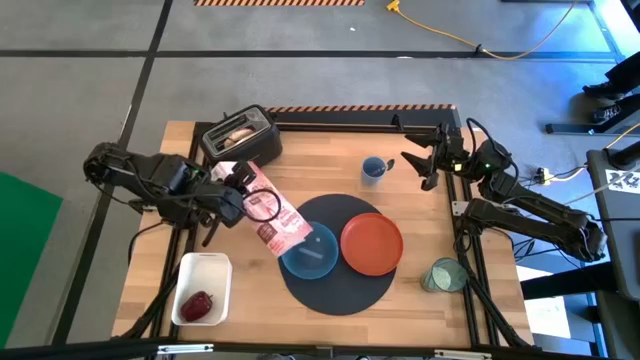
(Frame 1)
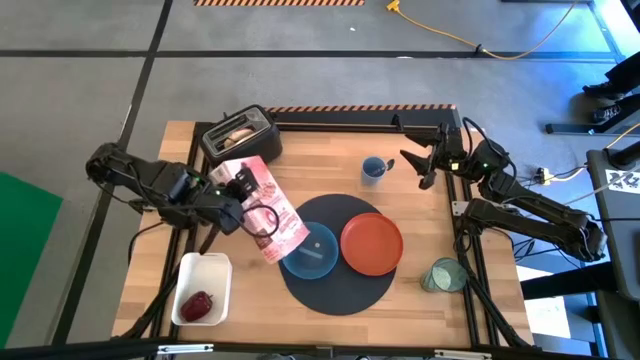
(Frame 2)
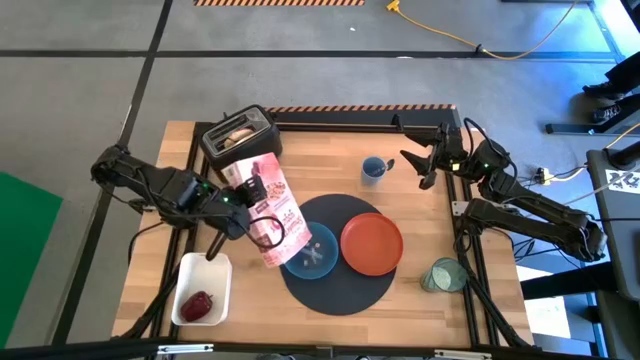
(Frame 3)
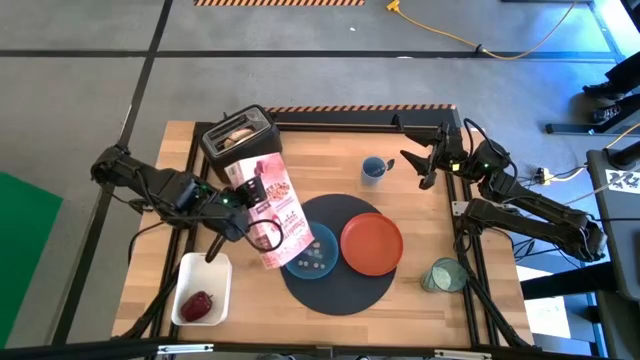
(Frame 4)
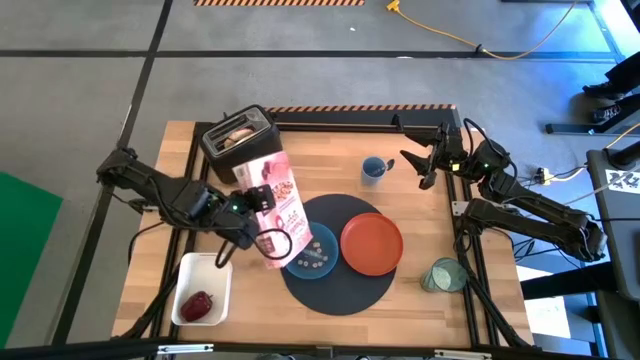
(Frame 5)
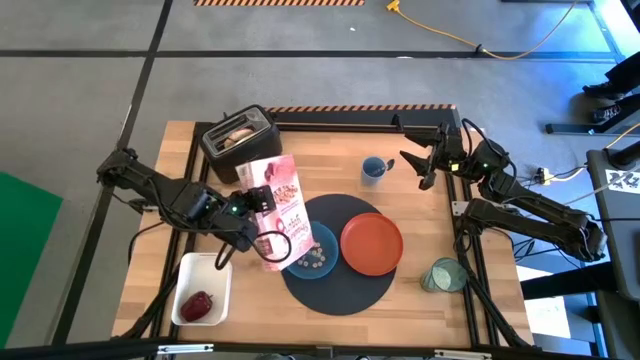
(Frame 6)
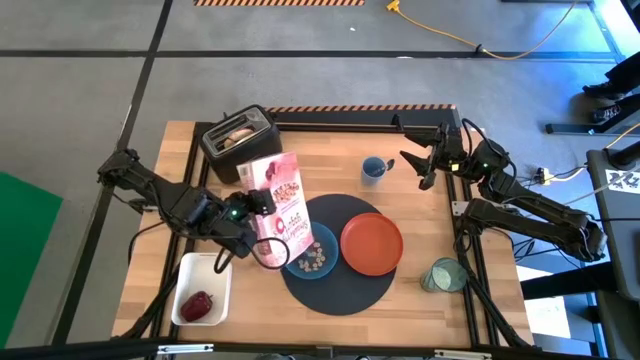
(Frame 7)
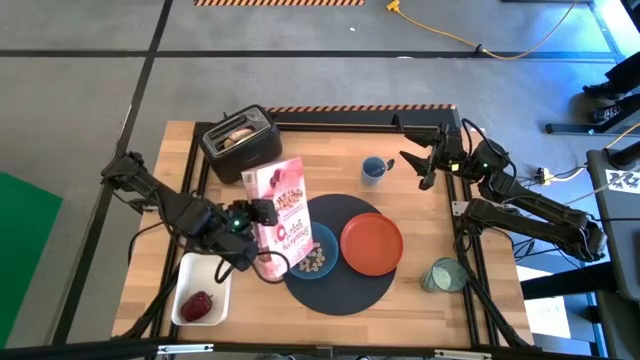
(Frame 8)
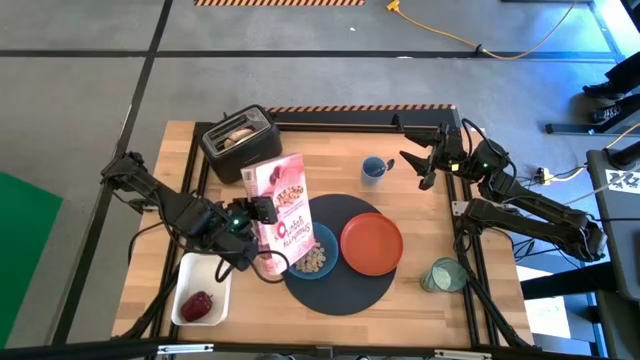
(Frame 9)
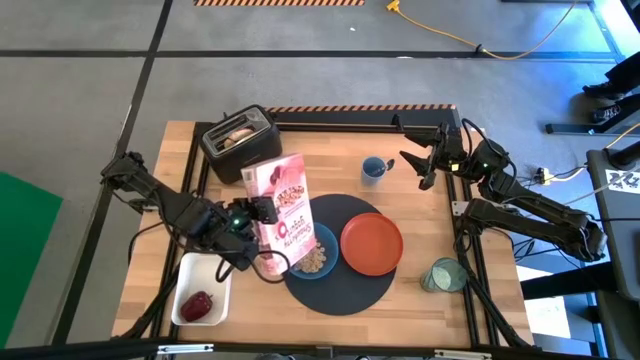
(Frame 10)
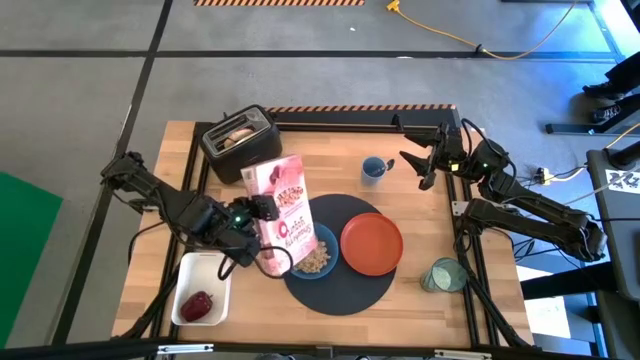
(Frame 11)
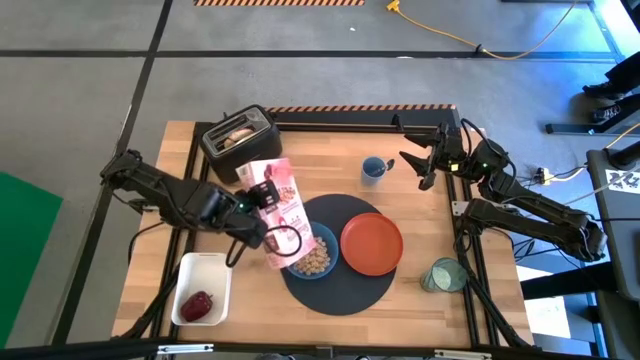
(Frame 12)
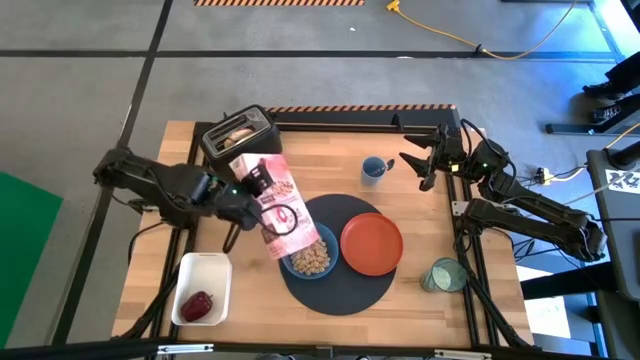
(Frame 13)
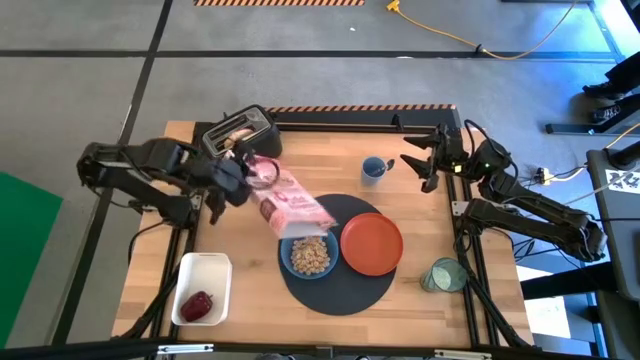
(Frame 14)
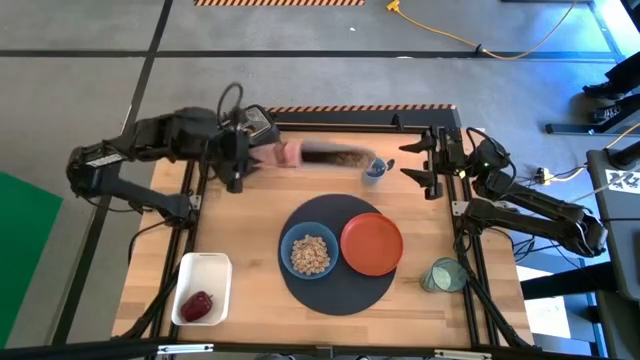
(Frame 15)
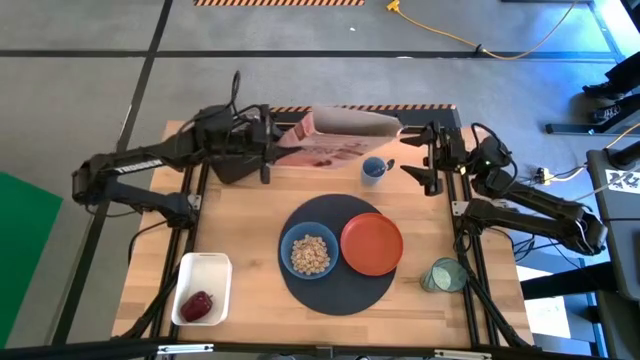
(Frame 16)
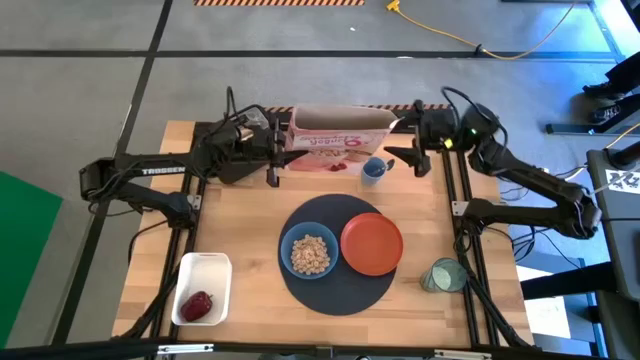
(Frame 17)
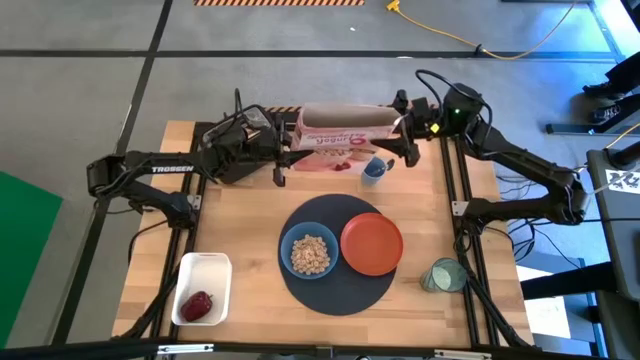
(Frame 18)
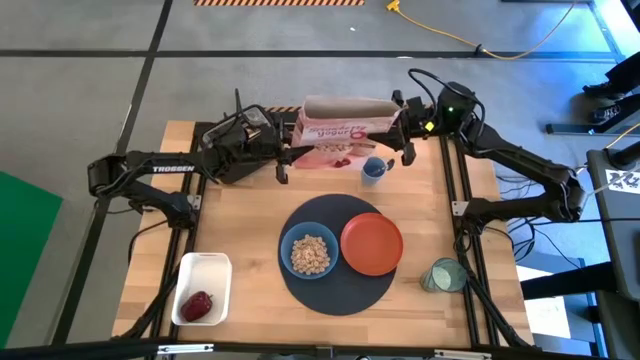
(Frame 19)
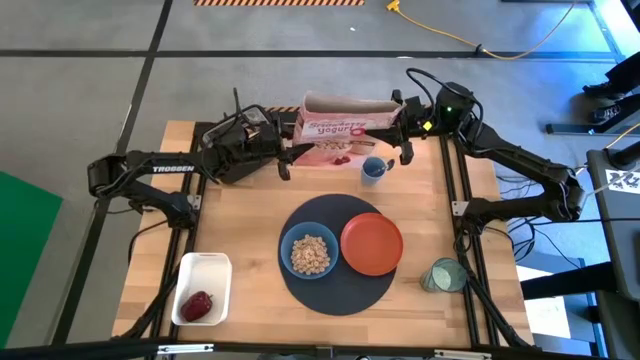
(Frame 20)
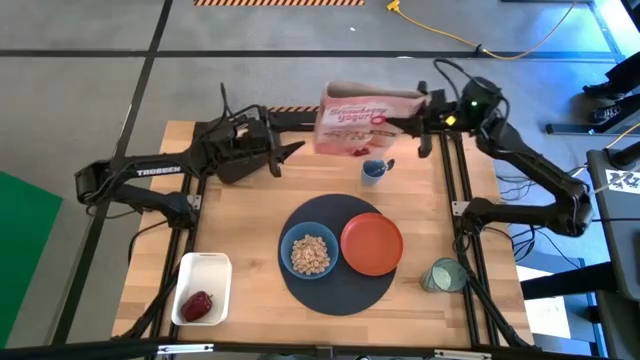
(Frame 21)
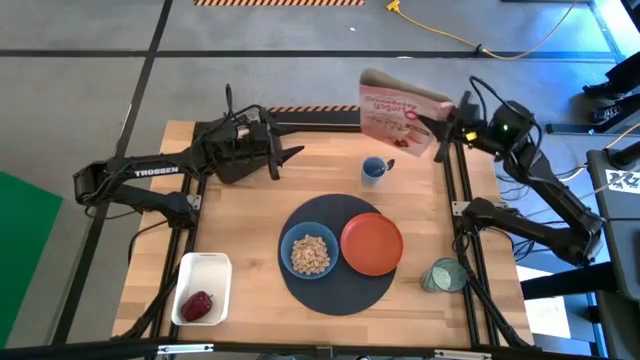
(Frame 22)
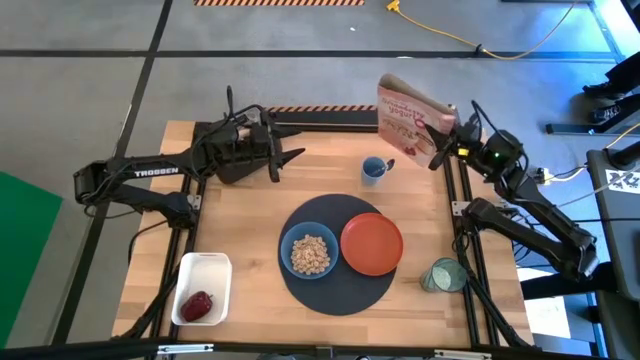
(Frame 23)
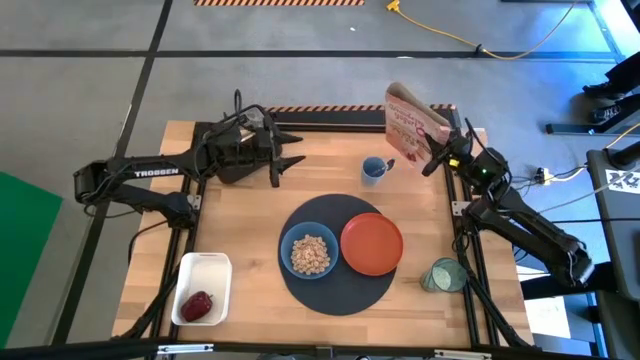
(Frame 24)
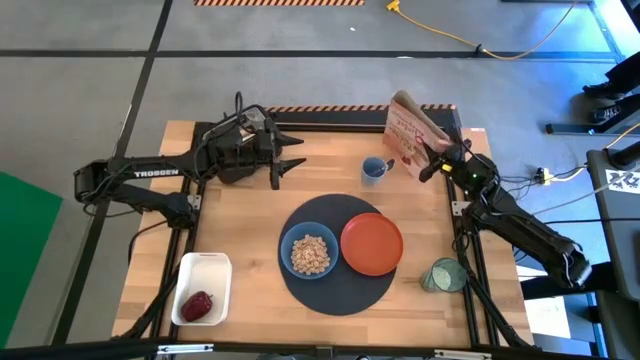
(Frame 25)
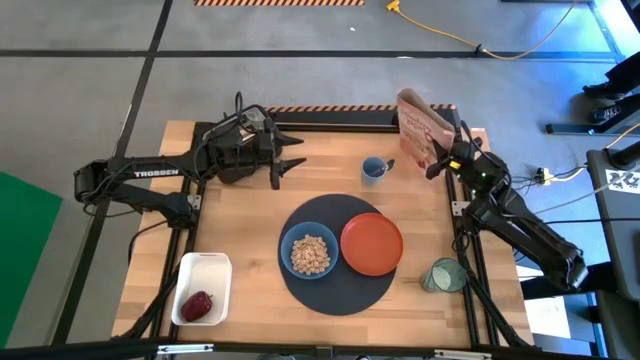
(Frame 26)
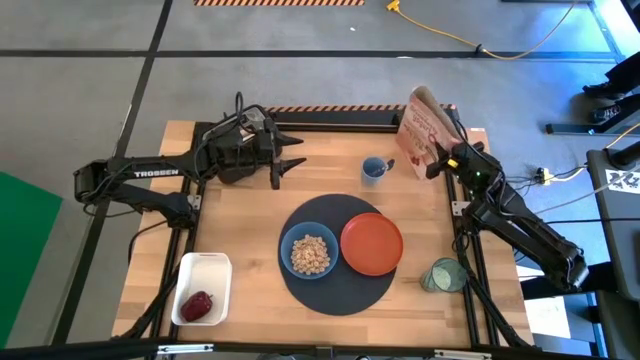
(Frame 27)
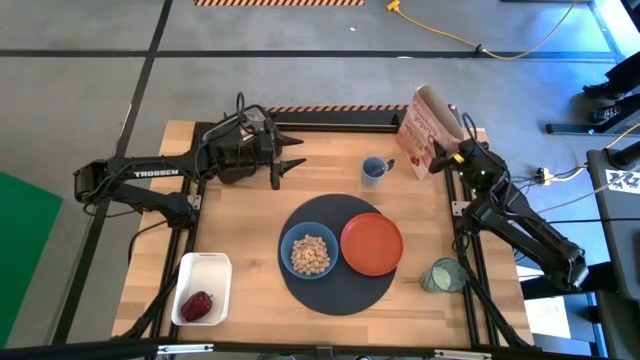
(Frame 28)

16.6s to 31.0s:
Task: Arrange a breakfast setting
Pour the cereal from the box on the blue bowl

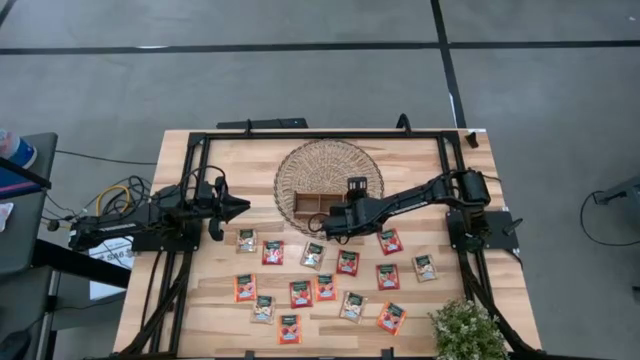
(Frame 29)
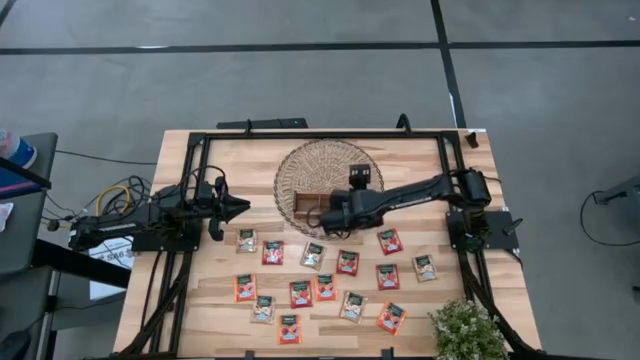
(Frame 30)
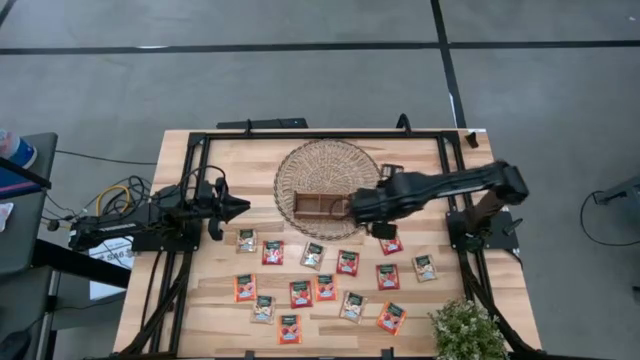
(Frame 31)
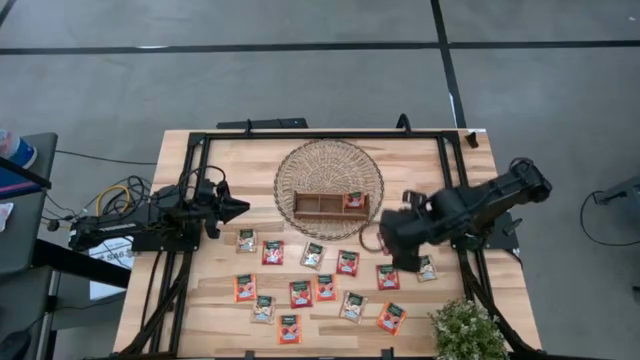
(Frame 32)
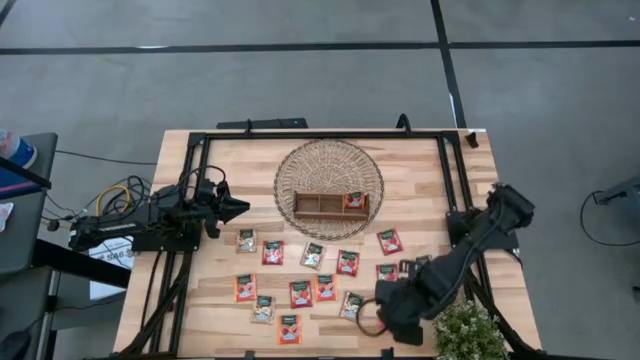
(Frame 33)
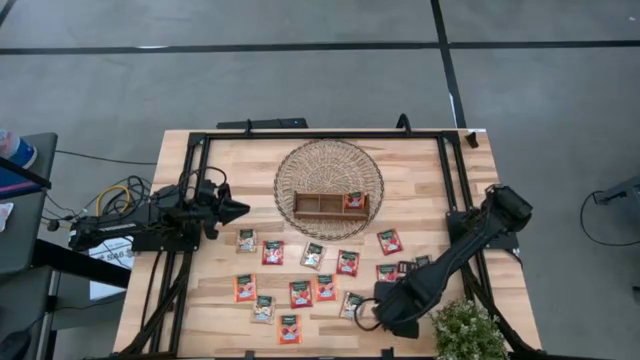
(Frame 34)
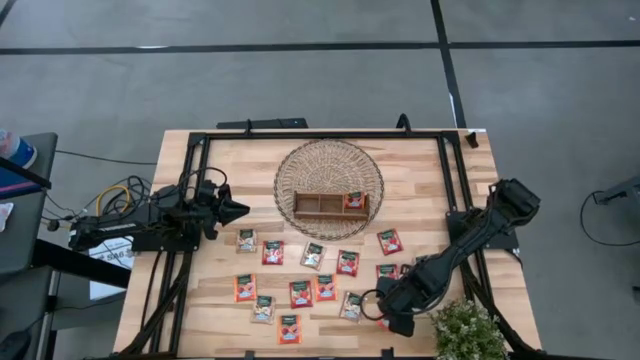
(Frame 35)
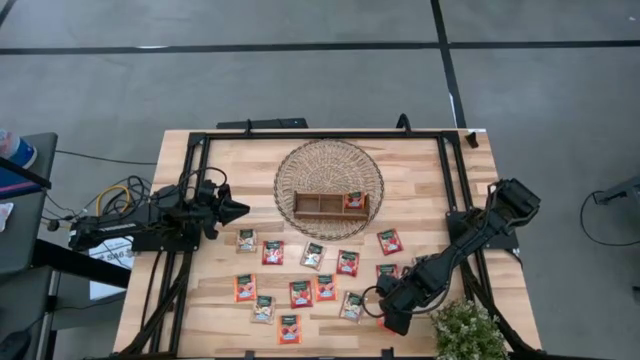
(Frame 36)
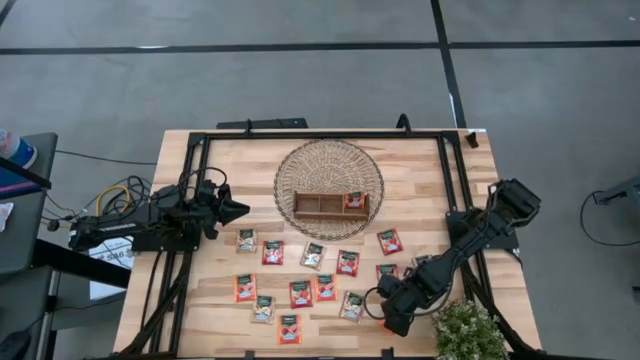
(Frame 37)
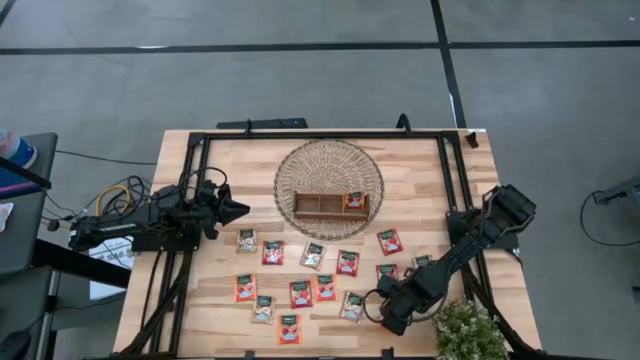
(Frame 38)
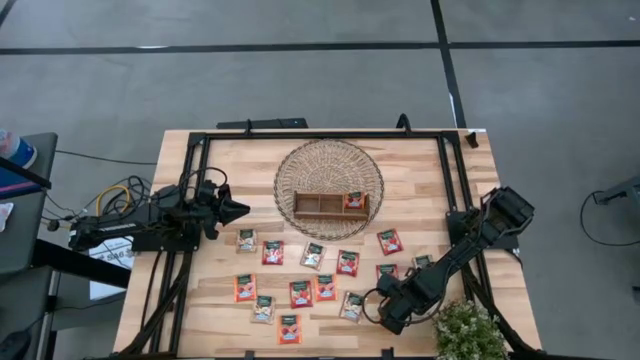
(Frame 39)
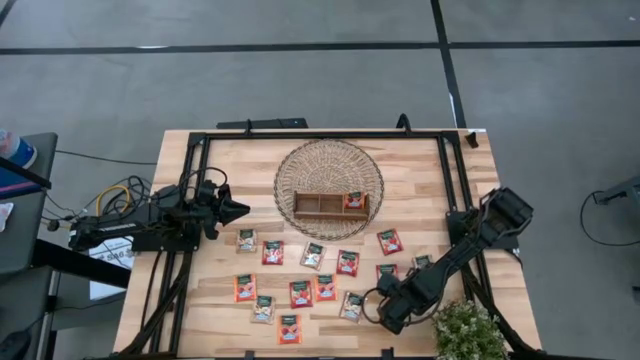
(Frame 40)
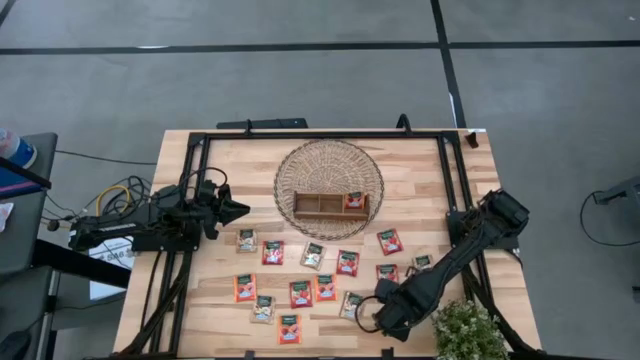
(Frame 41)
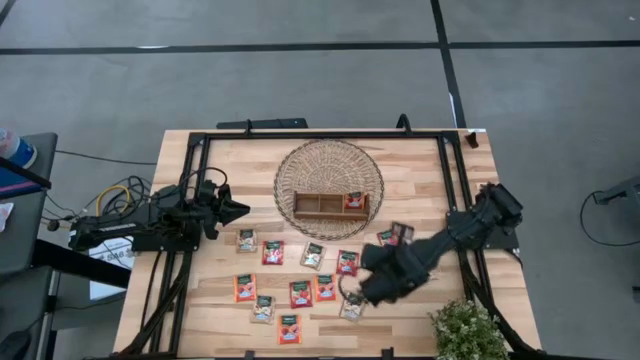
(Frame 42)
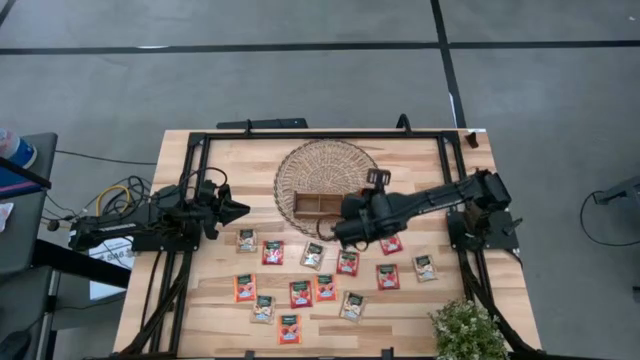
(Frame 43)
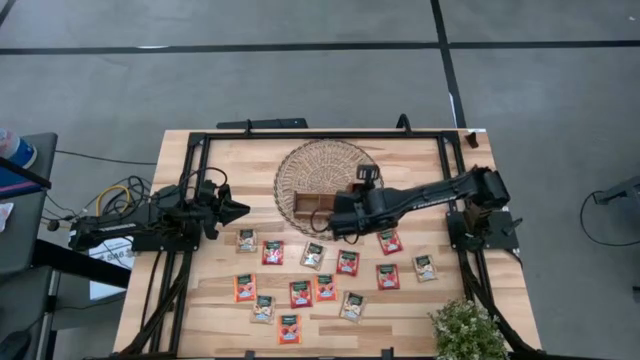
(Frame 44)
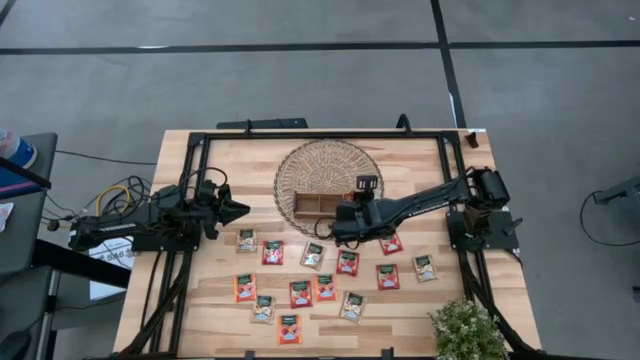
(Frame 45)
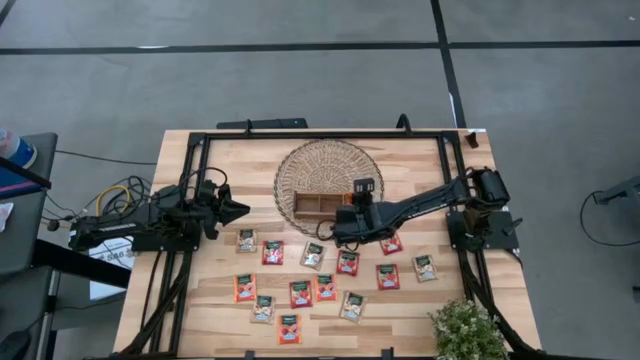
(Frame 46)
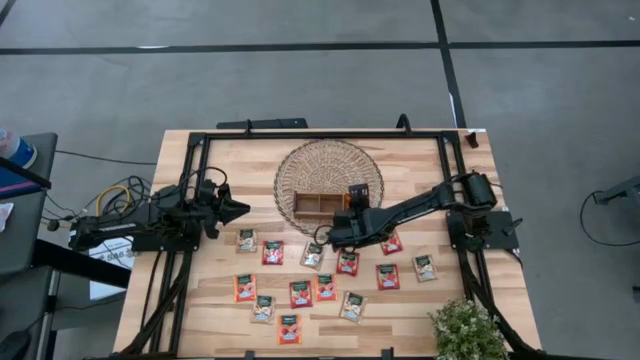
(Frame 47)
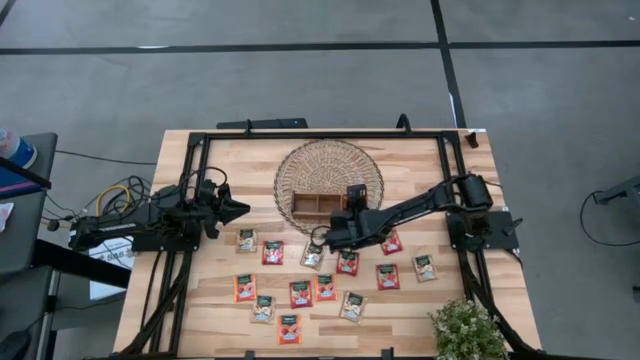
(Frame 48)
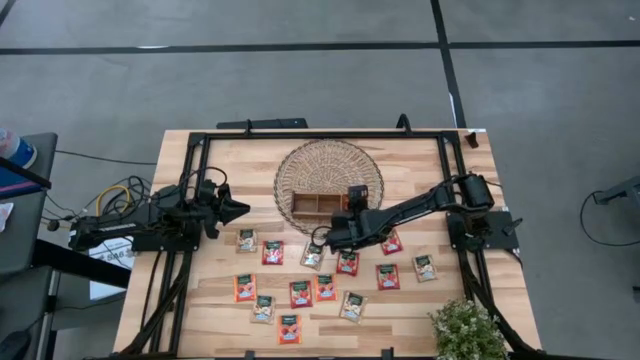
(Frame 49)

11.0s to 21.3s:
Task: Pick & Place Tea
Put the orange tea bag into the right section of the wooden organizer
